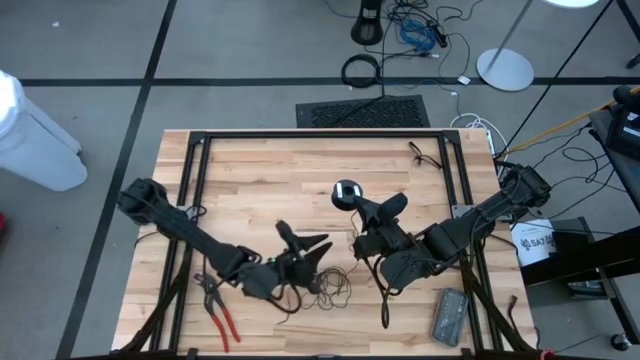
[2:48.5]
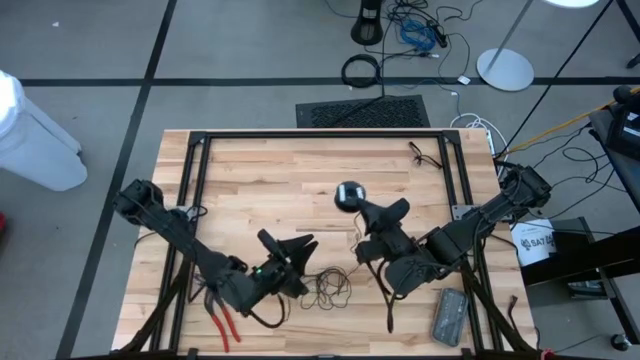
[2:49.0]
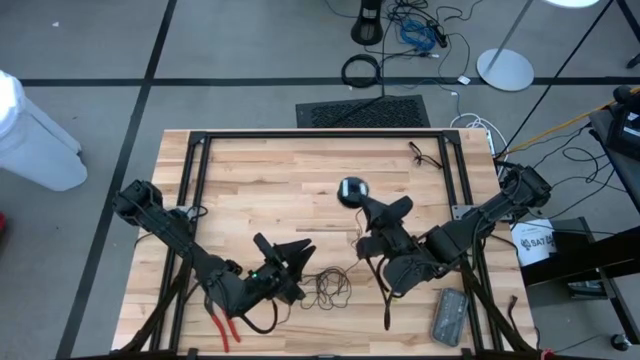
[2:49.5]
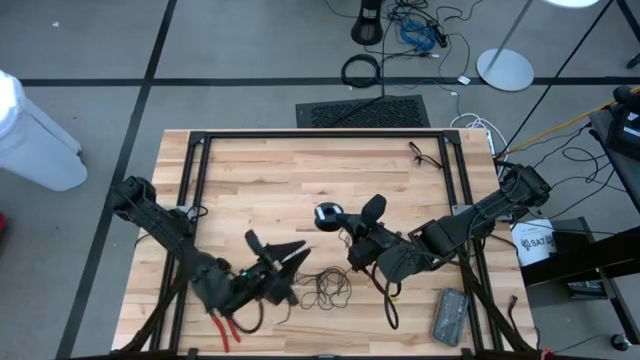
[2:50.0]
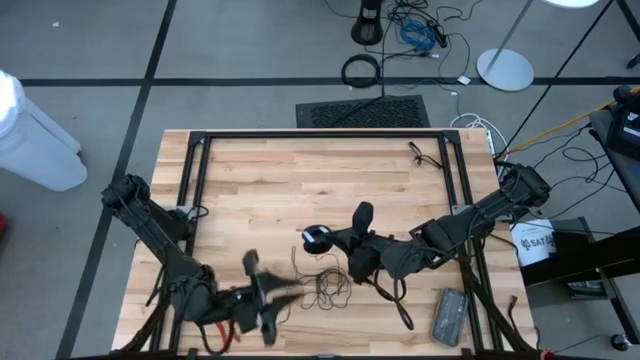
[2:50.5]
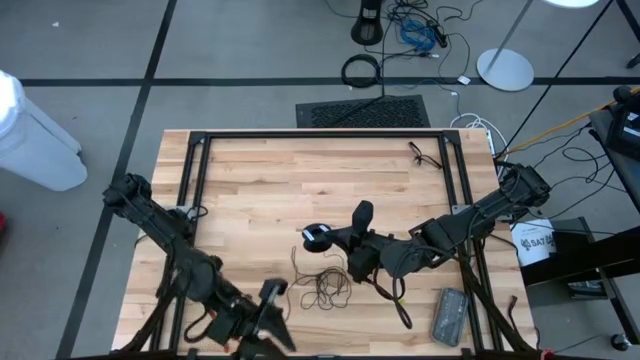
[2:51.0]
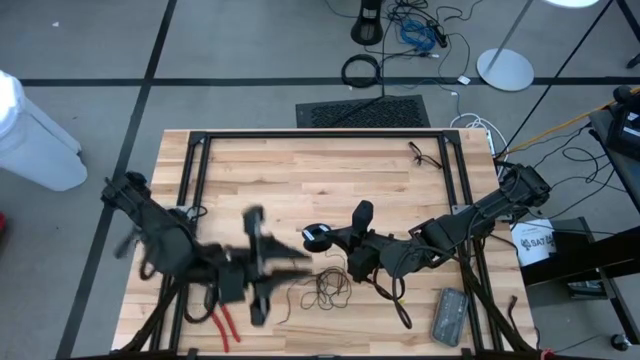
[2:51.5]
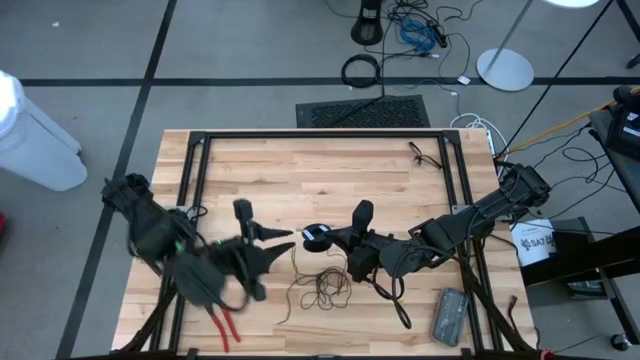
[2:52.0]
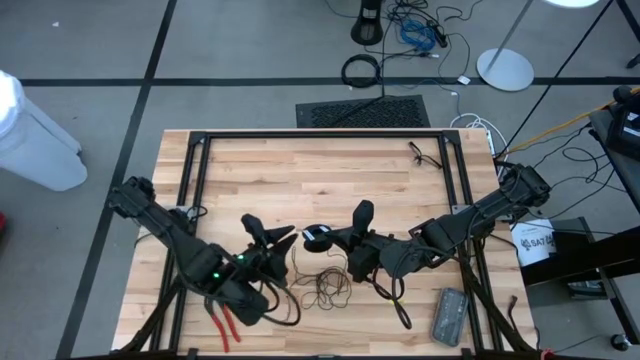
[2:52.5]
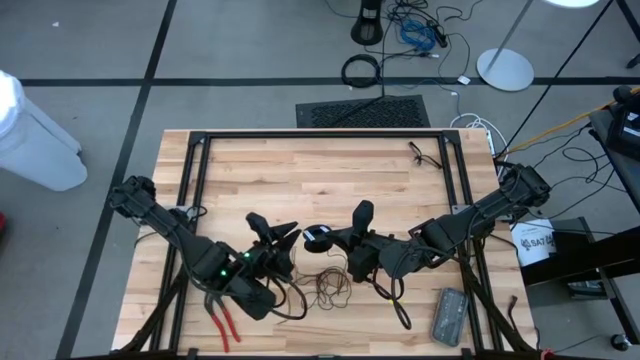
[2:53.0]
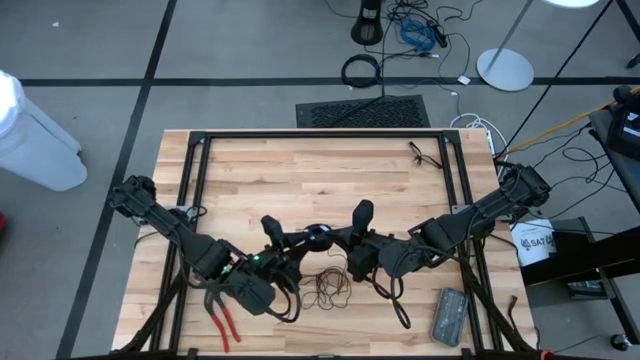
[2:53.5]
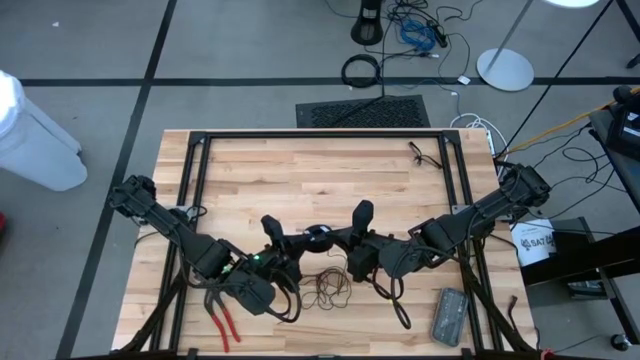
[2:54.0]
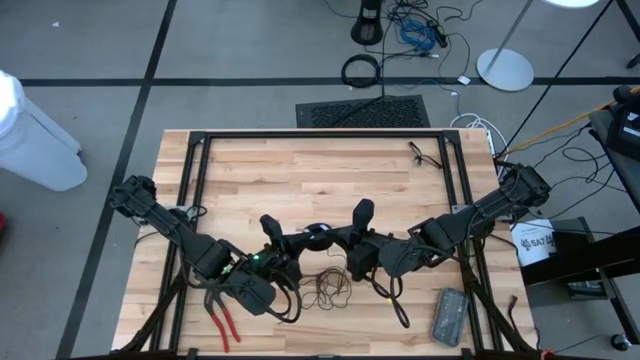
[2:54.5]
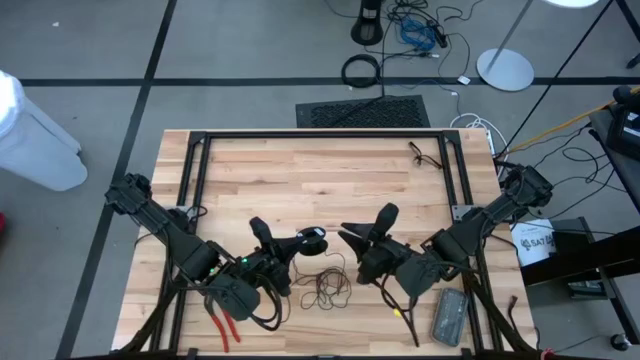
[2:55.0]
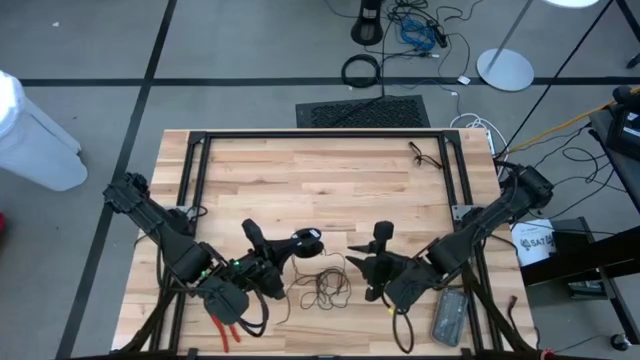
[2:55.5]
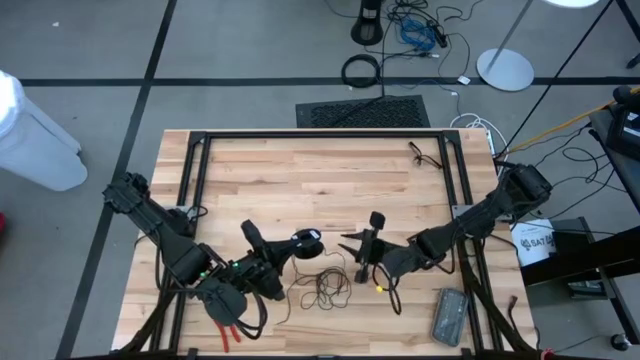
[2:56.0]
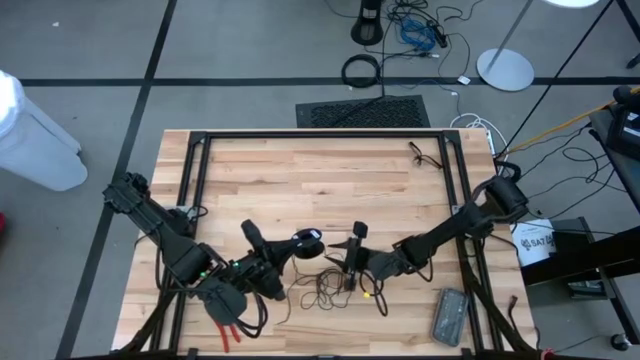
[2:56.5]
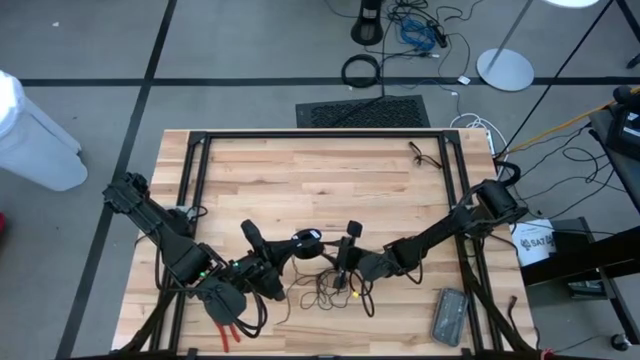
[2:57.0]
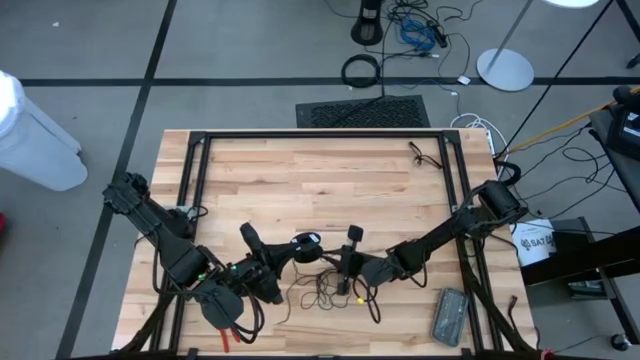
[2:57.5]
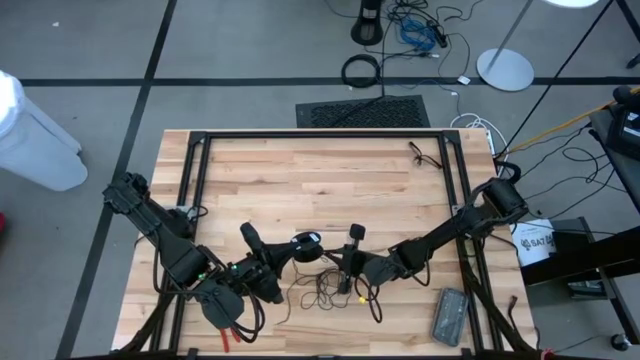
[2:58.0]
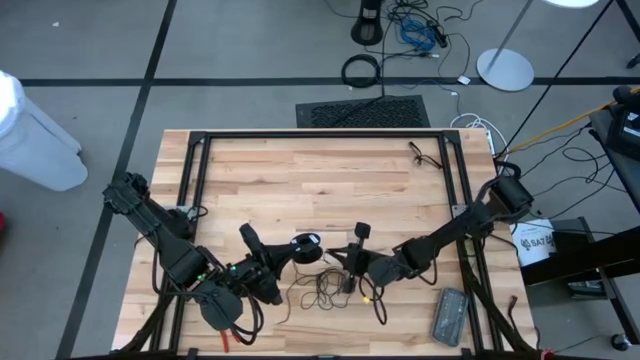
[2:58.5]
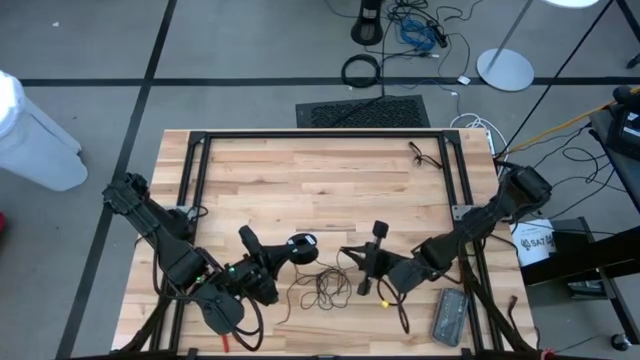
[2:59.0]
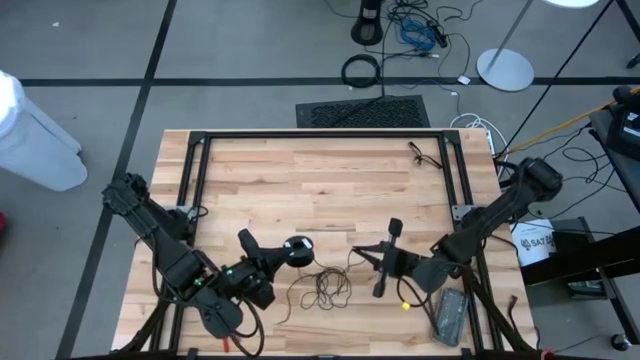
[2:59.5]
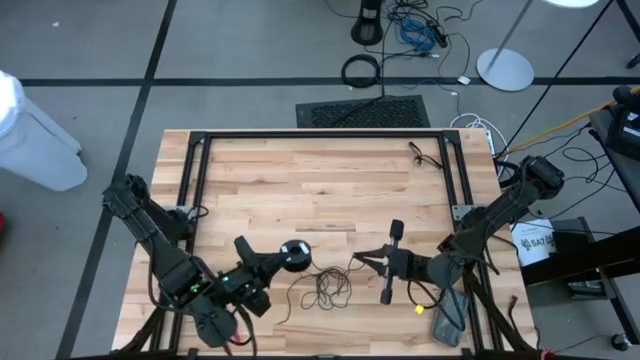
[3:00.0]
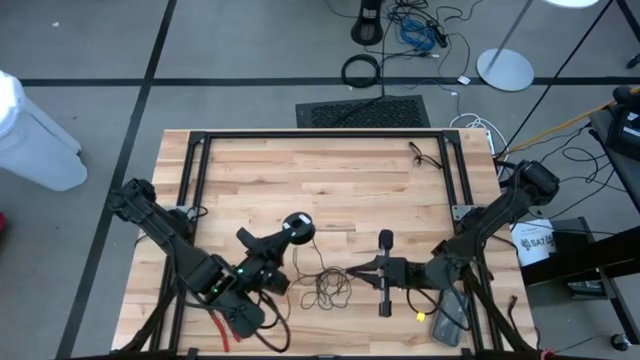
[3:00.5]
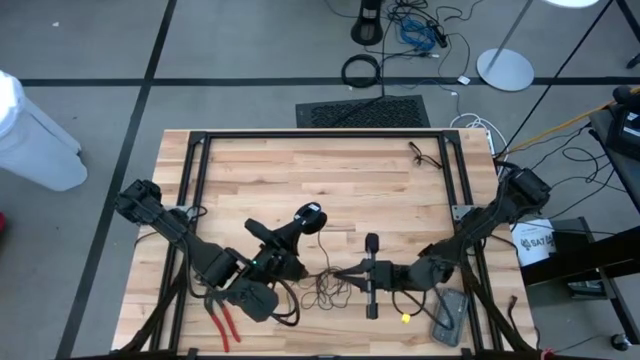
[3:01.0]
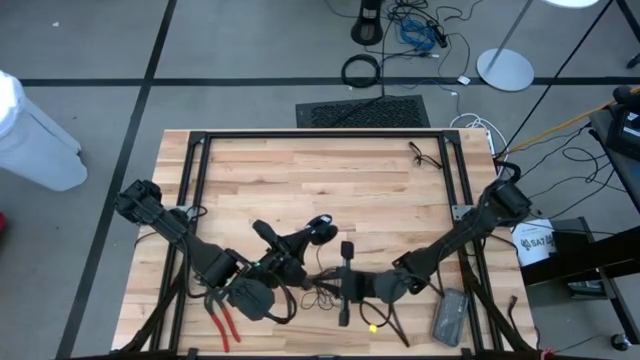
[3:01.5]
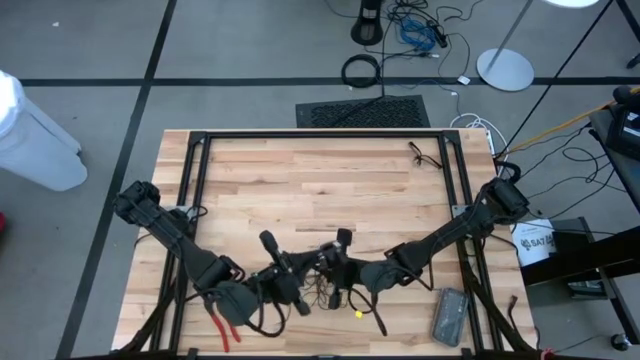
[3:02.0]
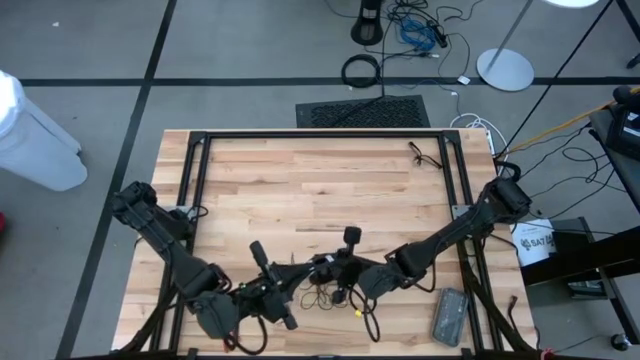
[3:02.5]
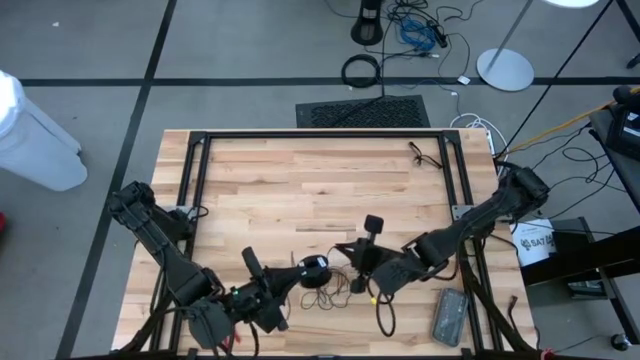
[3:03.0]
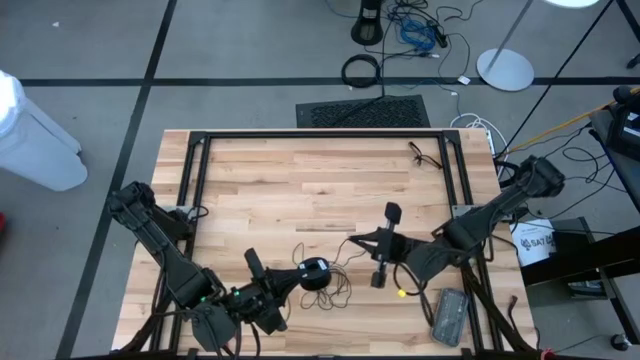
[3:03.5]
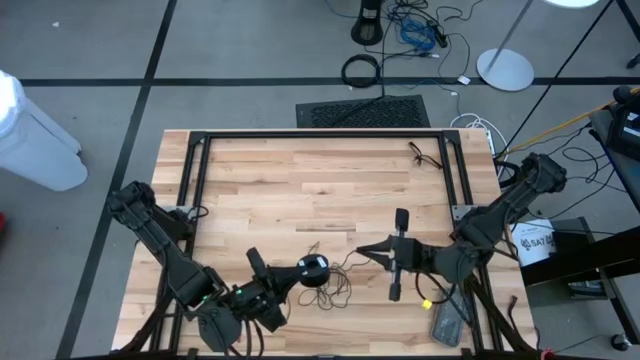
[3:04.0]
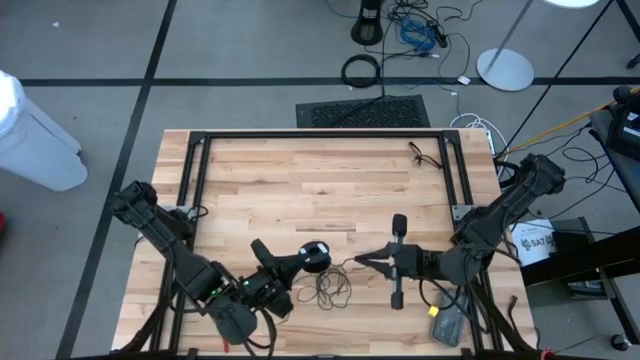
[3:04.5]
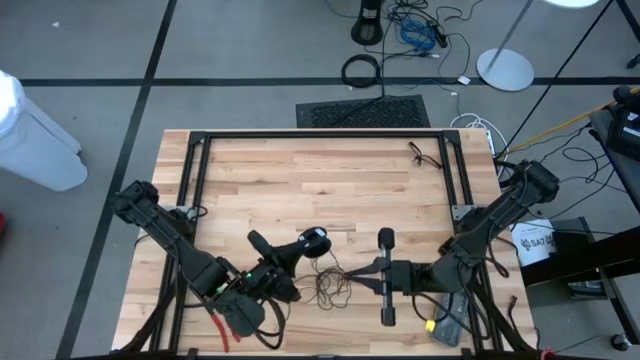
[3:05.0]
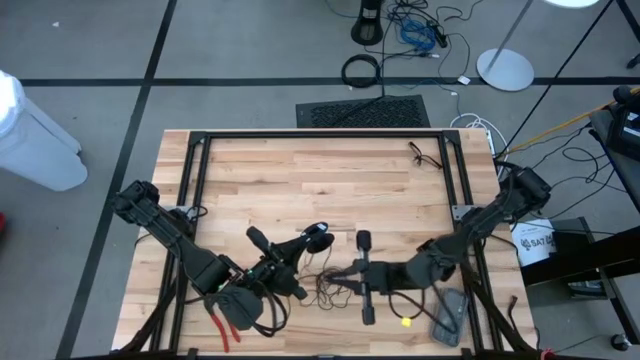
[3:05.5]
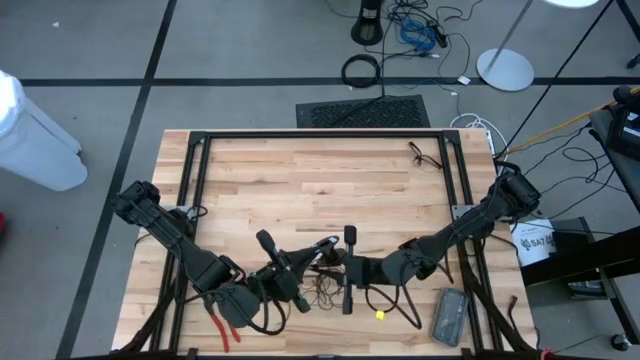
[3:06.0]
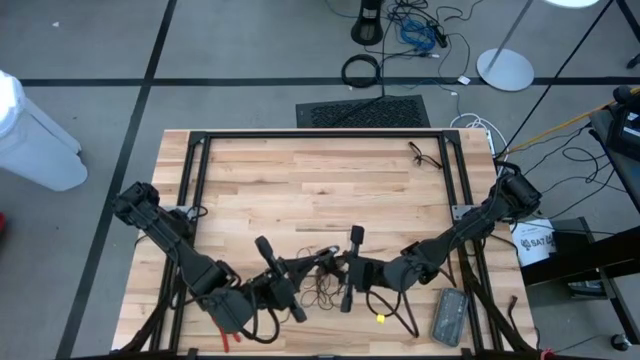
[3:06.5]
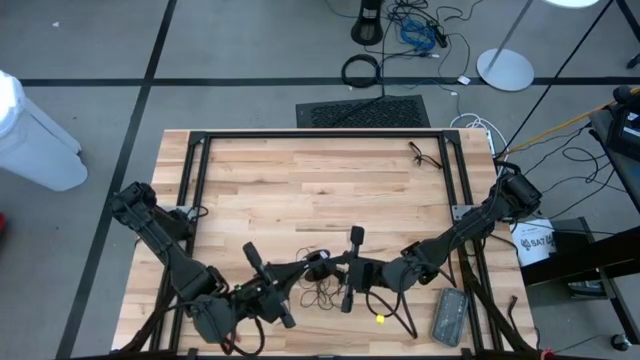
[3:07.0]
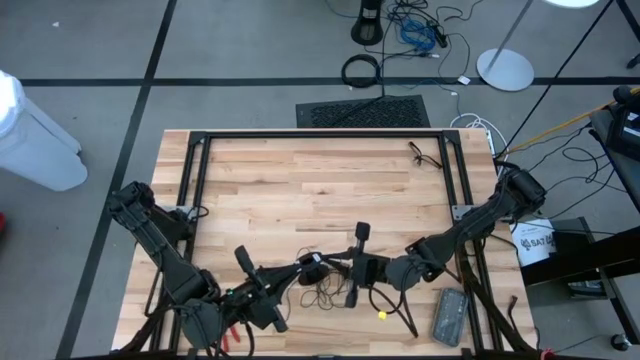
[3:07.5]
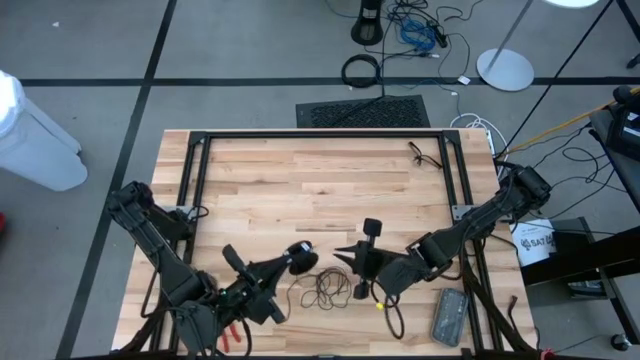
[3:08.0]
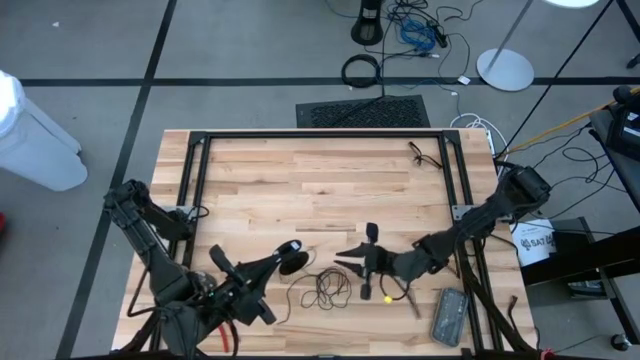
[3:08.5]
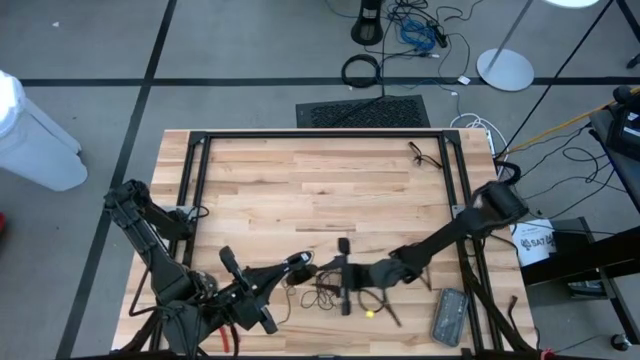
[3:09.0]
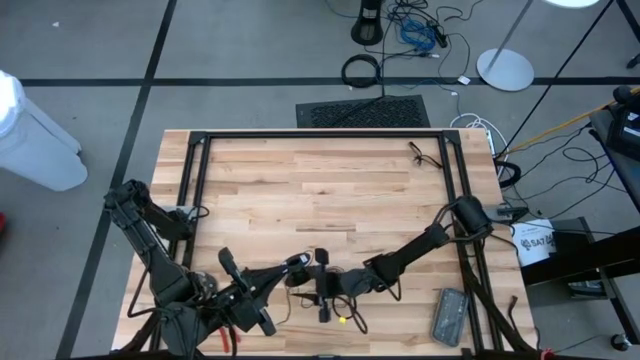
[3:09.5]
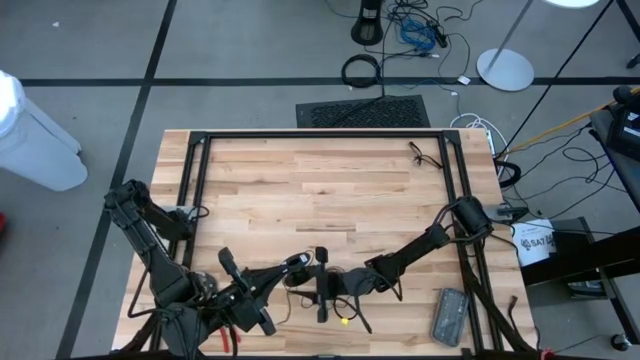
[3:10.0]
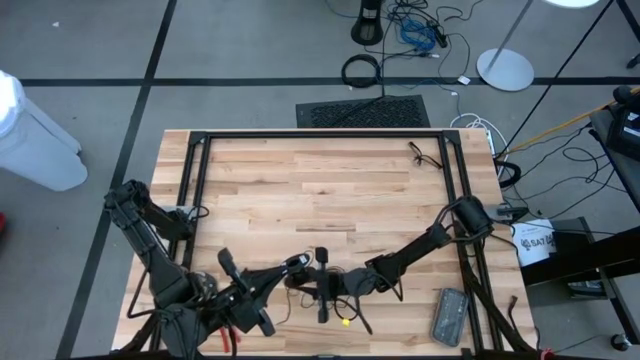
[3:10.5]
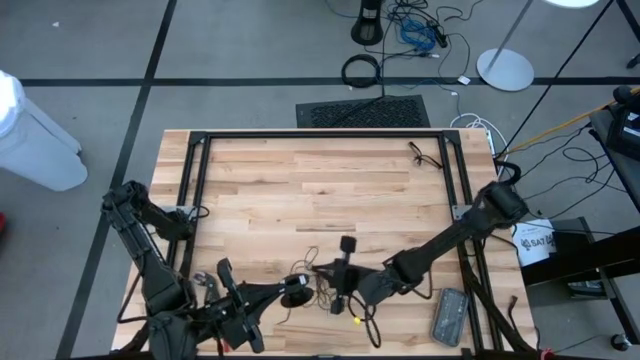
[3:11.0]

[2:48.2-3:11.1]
Task: Coil cords
Coil the black wire onto the black spool
